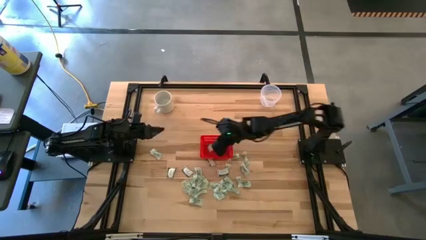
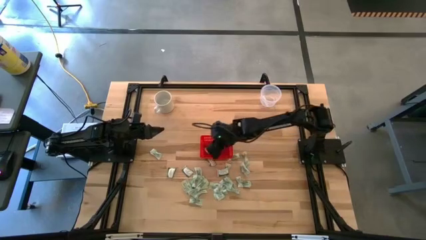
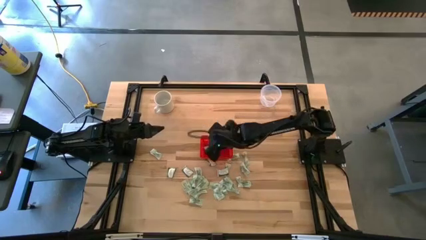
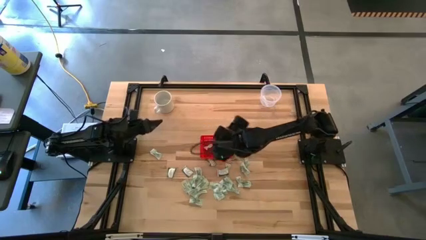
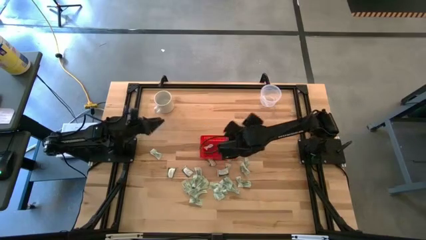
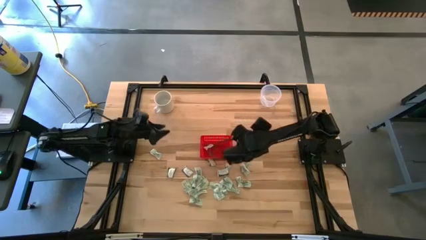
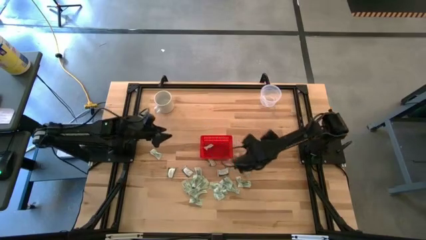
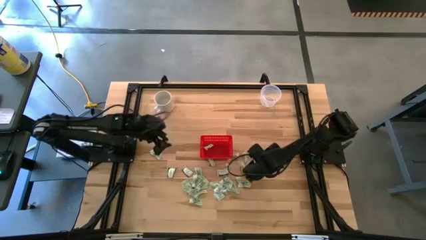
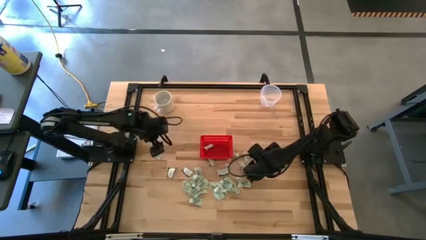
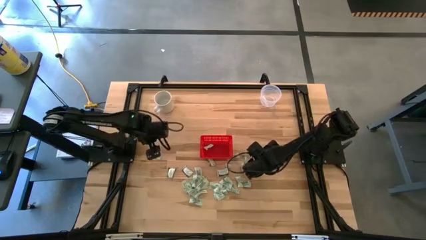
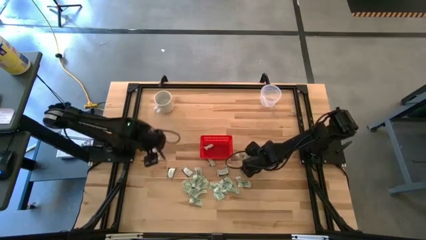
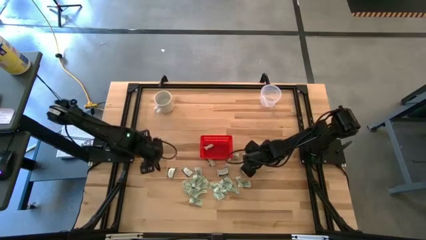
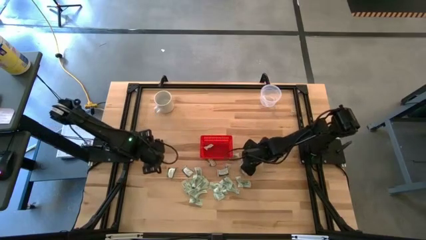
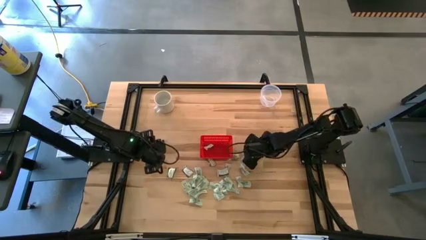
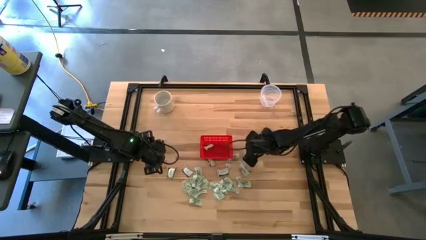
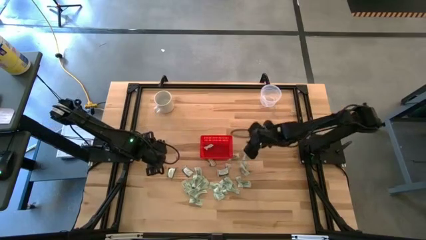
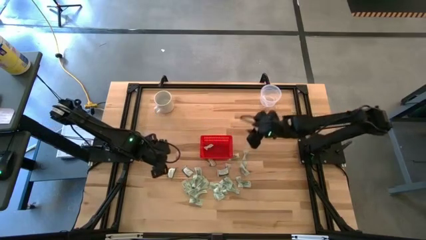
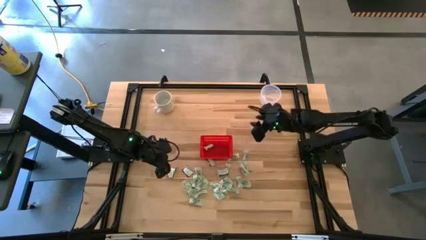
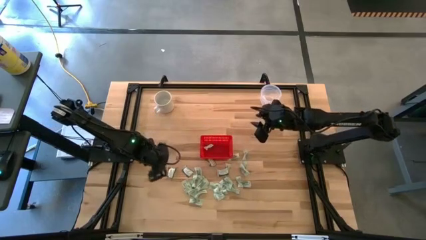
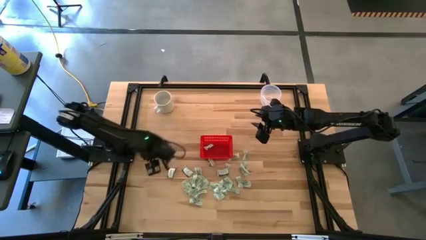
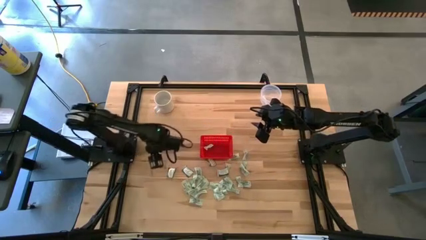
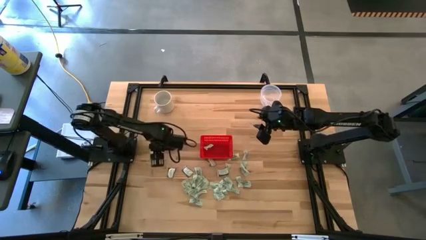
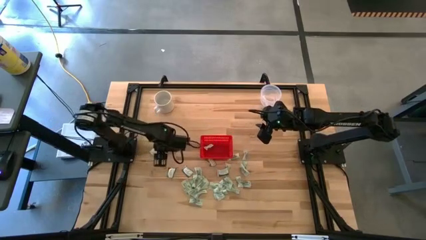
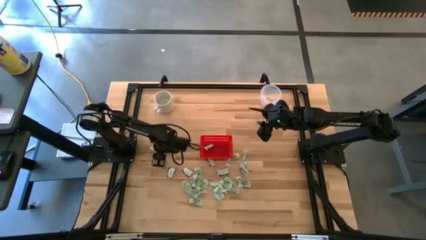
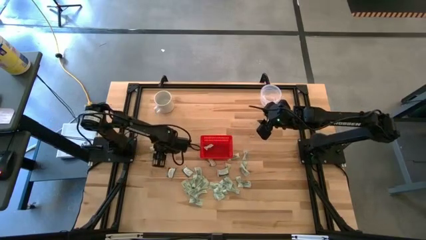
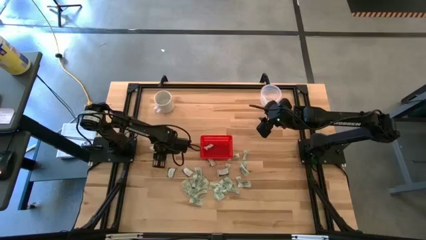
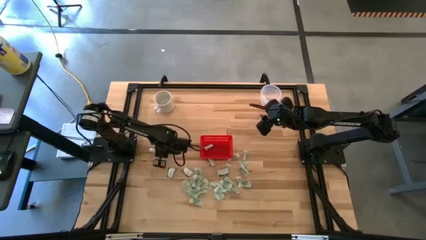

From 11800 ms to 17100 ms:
Task: Pick and place items into bin
Put the stevia packet into the red bin

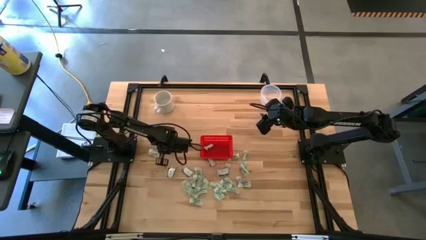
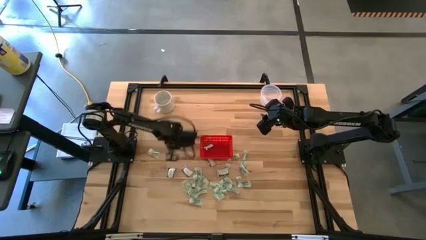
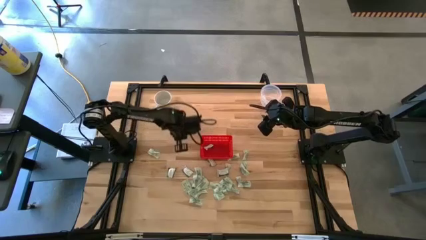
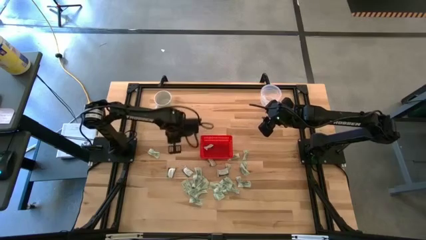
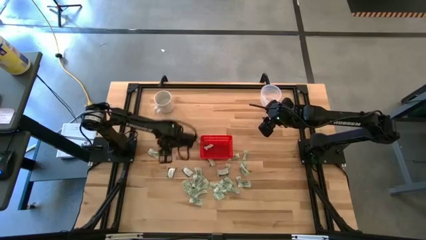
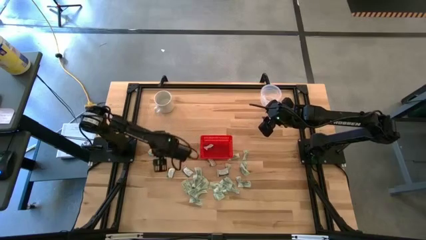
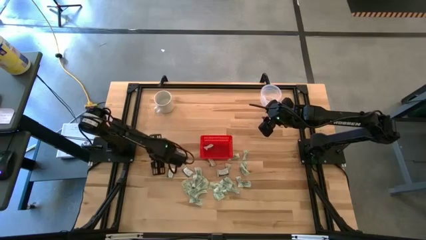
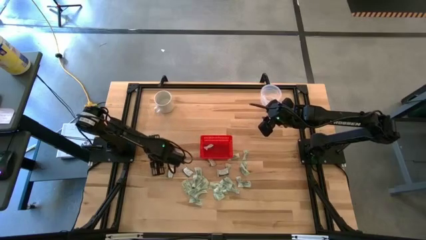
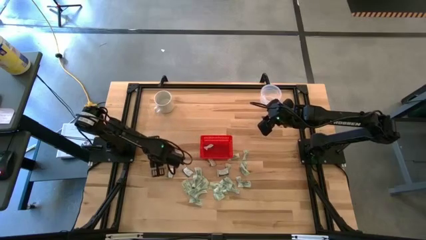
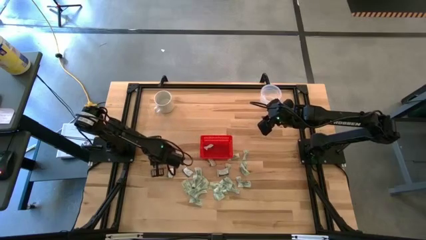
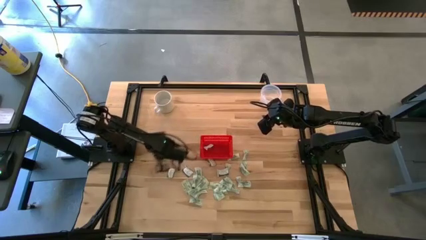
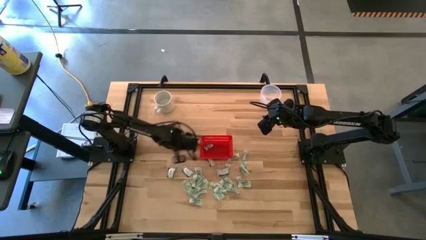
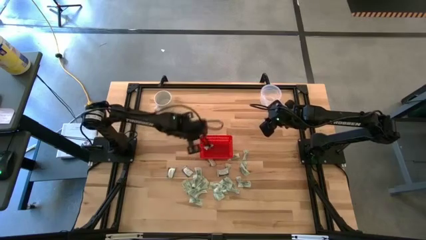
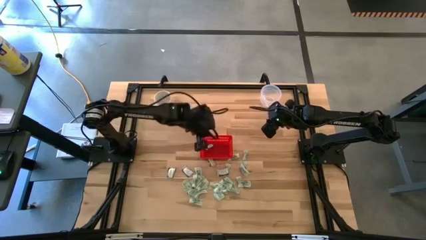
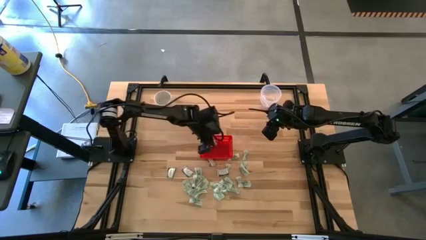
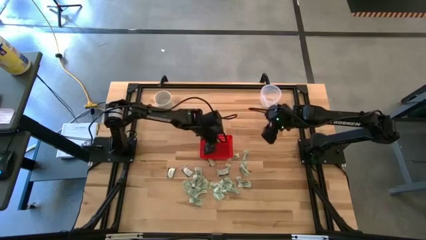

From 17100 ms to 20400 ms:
Put the stevia packet into the red bin

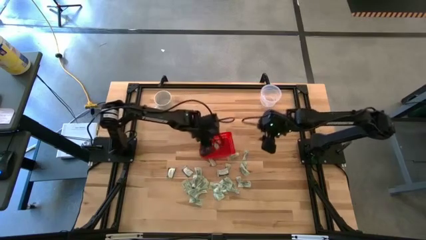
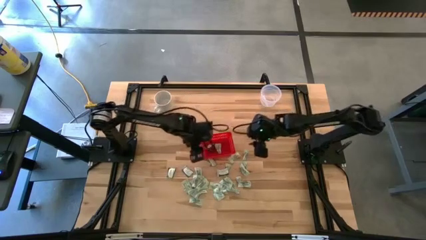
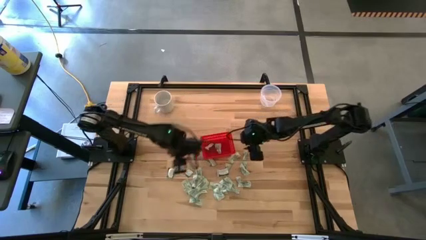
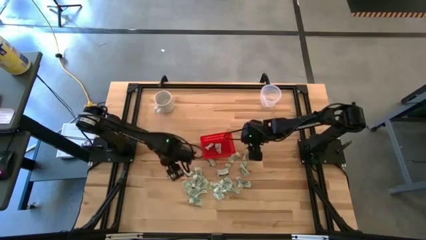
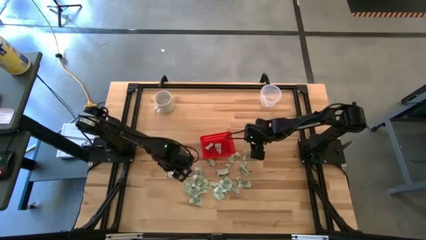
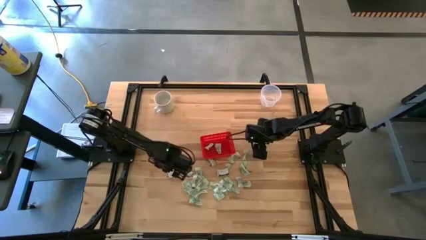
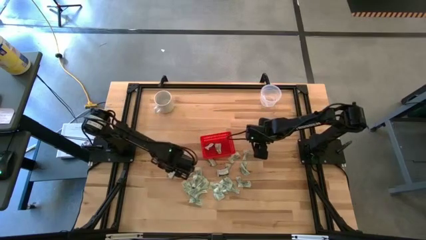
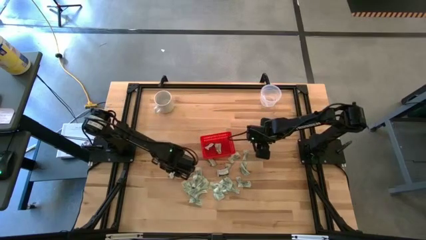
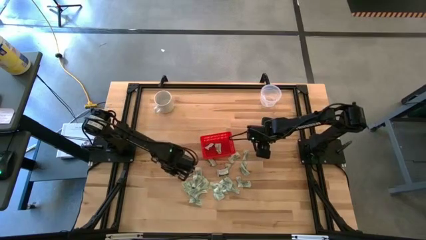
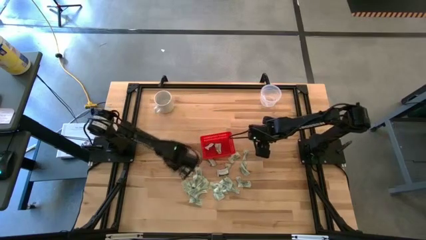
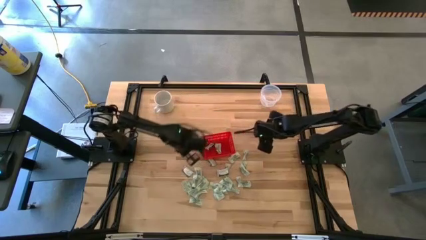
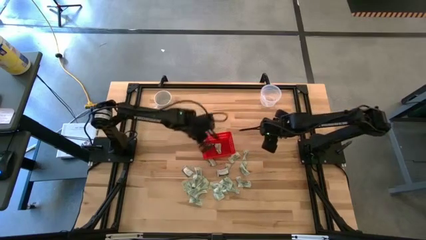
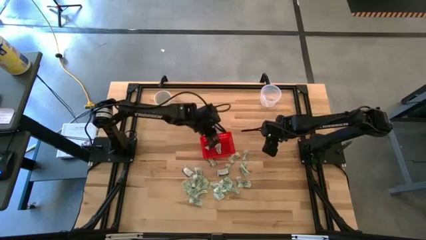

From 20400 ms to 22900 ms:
Put the truvia packet into the red bin

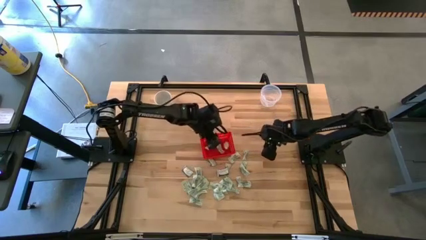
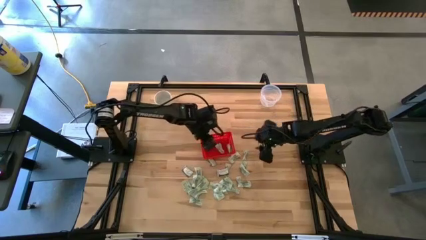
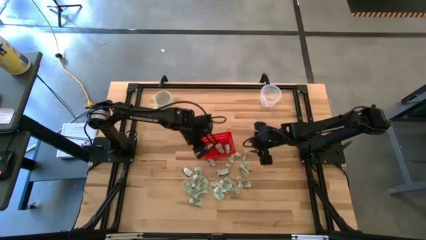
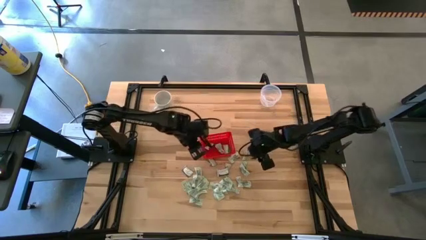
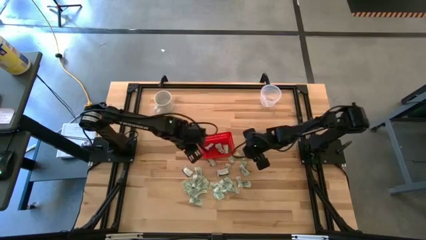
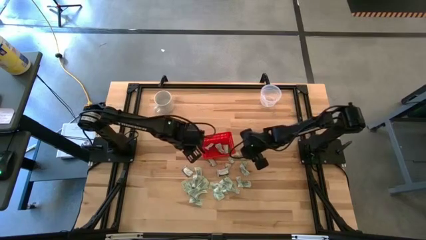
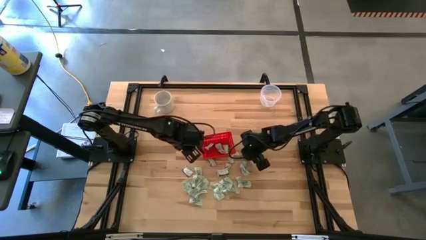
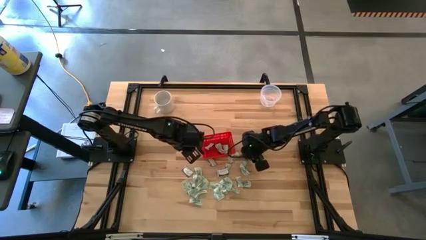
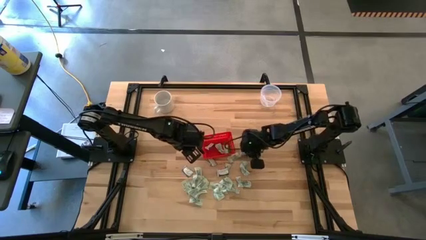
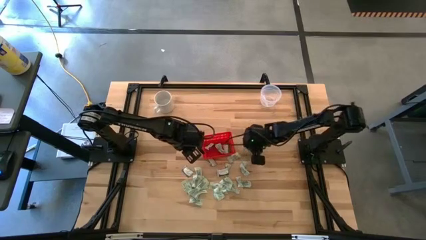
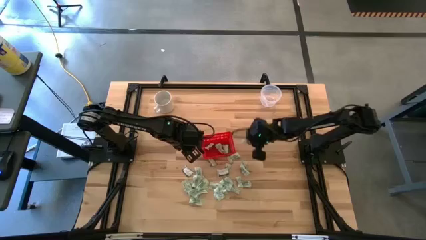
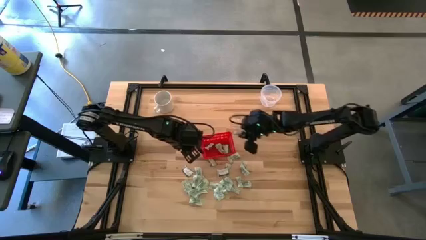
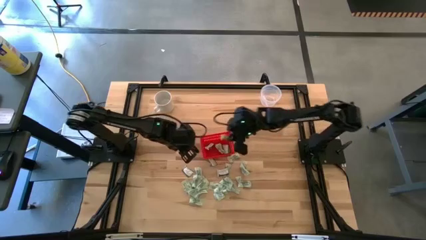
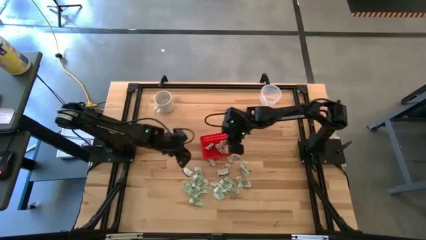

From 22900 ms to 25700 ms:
Put the stevia packet into the red bin

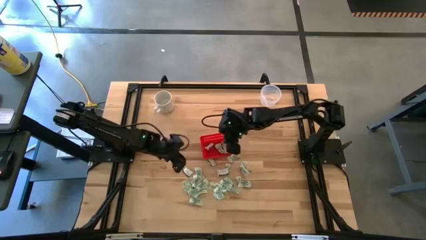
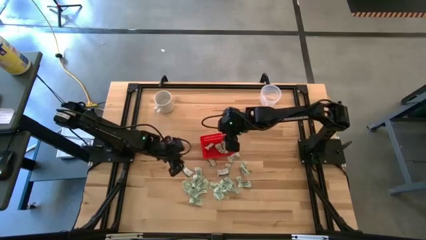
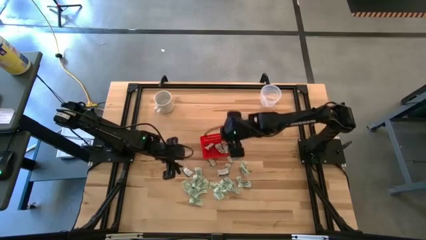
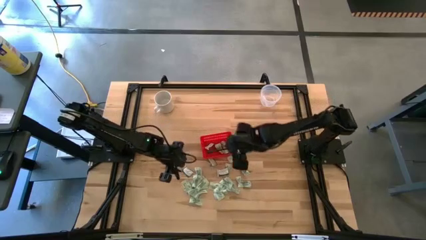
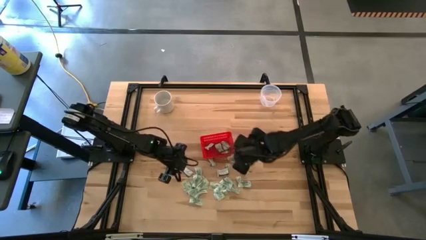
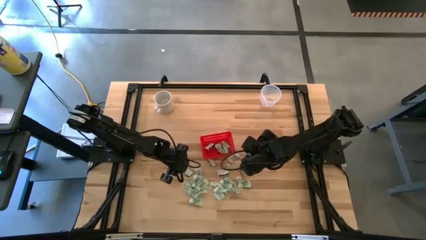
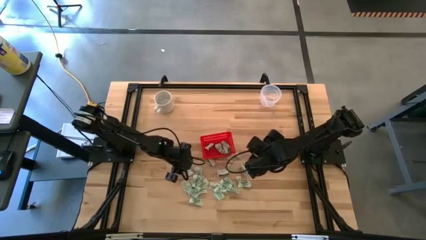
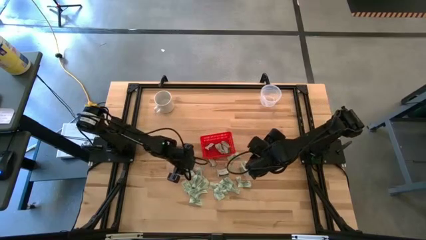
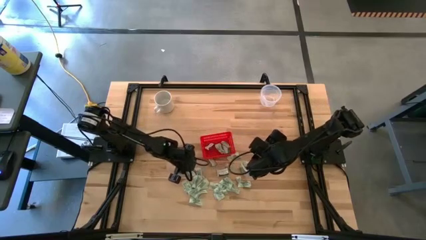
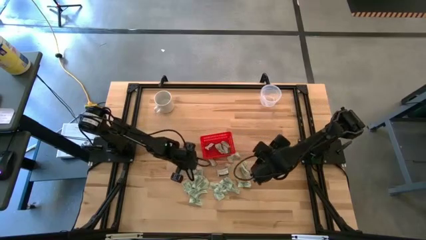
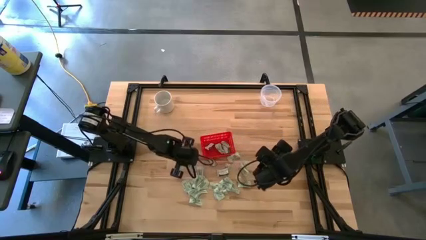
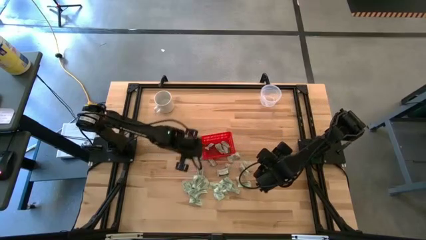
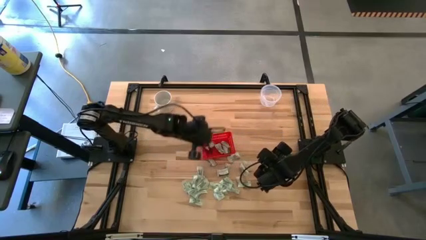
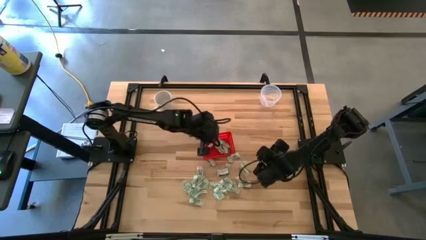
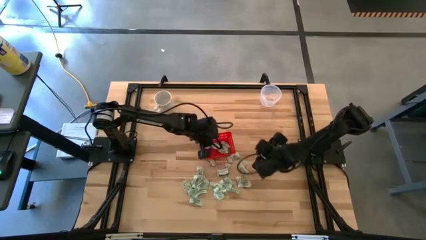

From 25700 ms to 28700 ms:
Put the truvia packet into the red bin

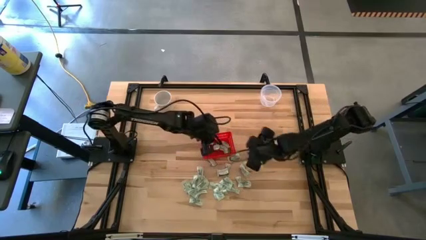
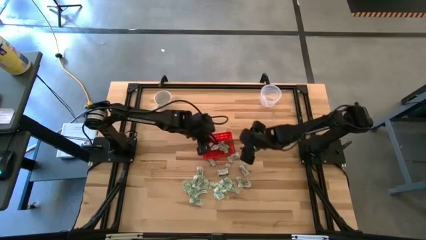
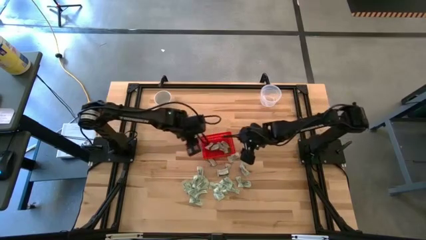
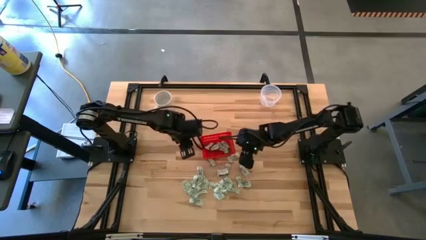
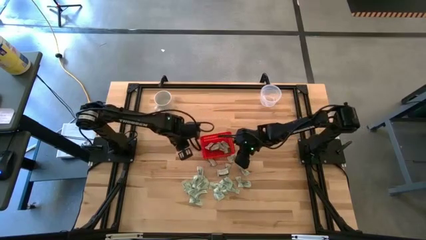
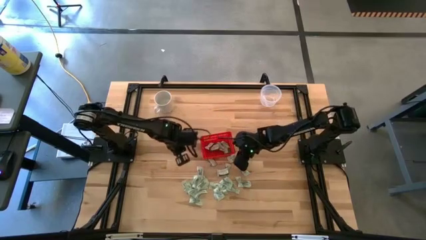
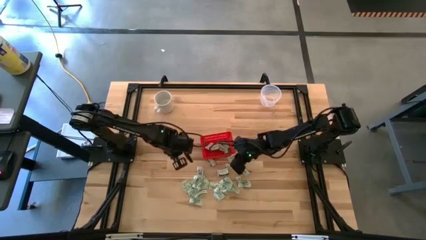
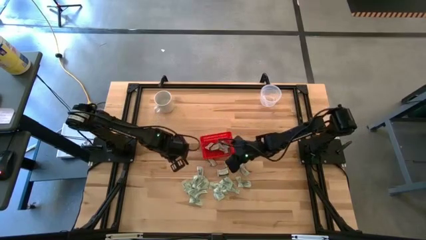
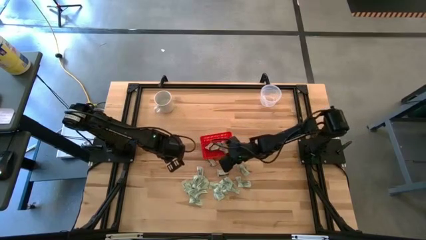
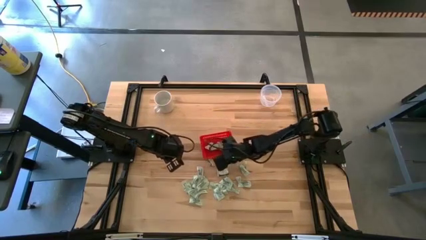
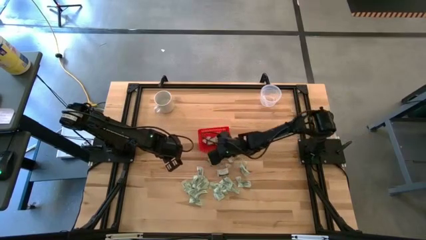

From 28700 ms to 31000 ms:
Adjust the red bin
